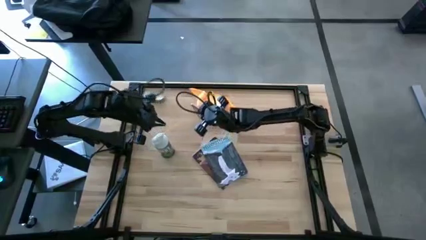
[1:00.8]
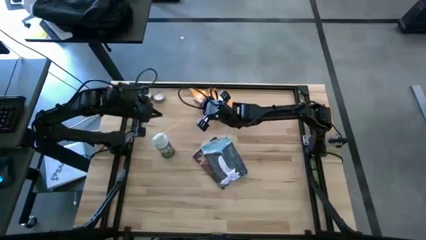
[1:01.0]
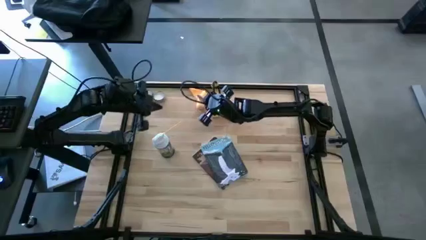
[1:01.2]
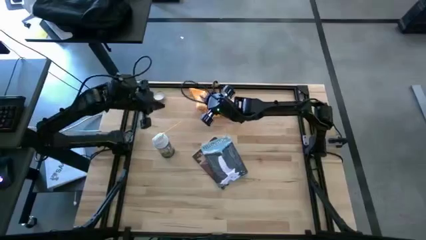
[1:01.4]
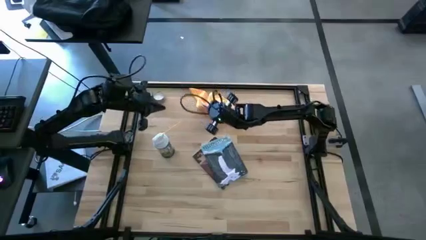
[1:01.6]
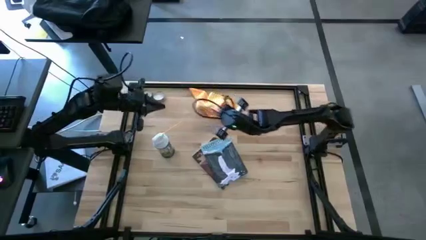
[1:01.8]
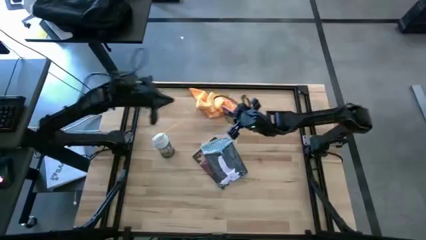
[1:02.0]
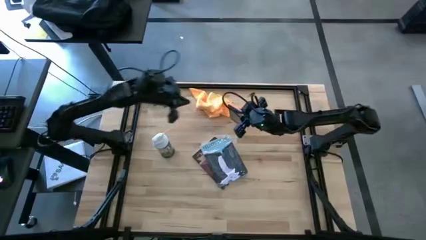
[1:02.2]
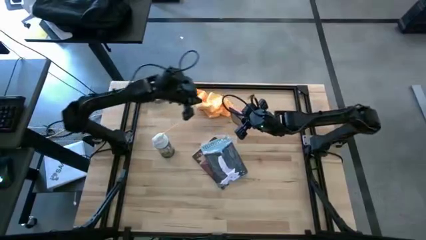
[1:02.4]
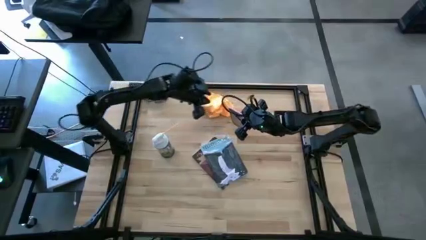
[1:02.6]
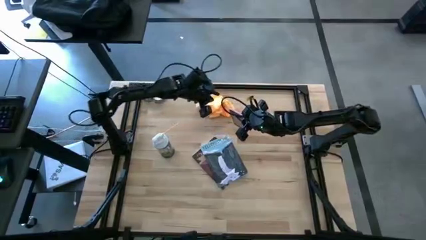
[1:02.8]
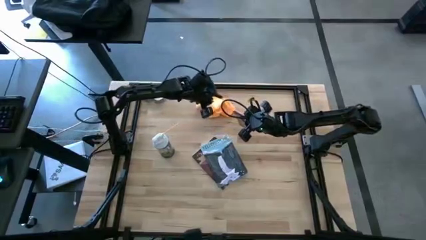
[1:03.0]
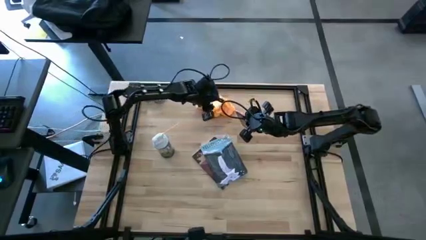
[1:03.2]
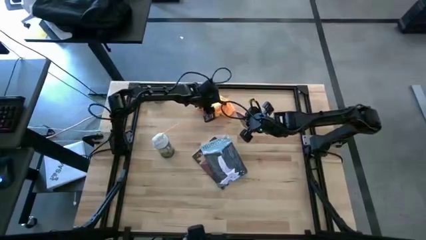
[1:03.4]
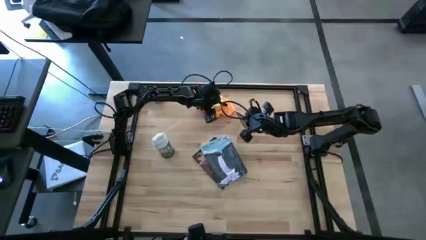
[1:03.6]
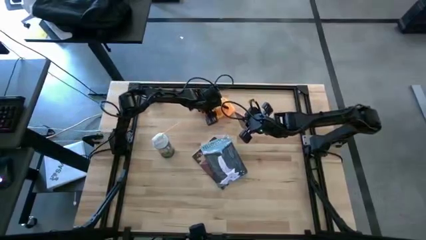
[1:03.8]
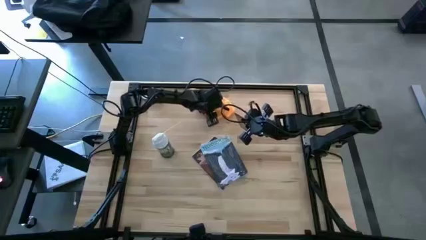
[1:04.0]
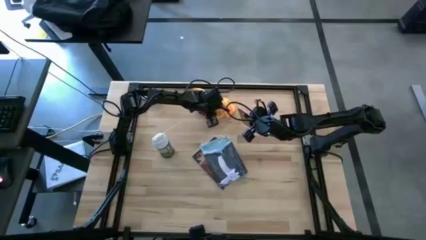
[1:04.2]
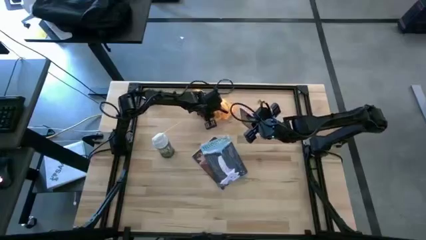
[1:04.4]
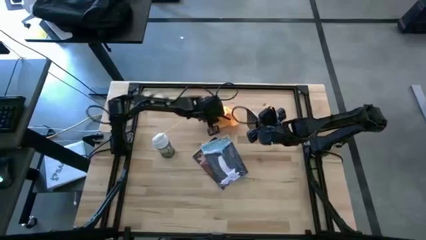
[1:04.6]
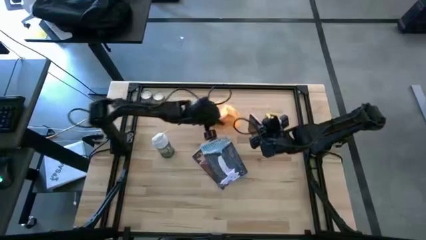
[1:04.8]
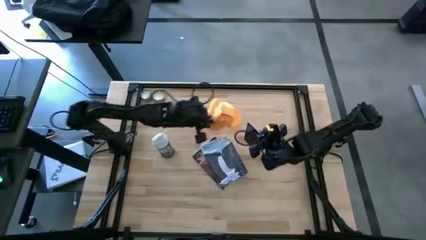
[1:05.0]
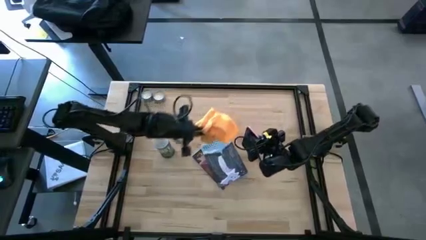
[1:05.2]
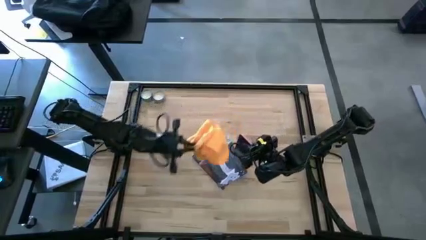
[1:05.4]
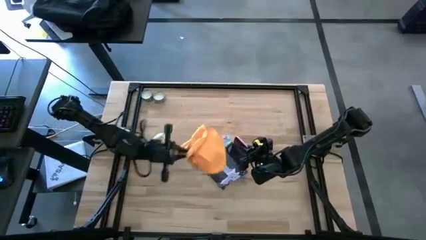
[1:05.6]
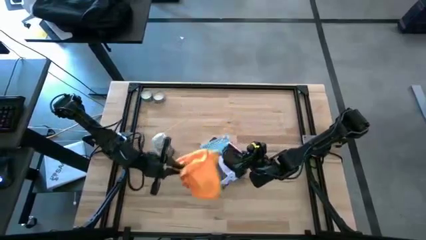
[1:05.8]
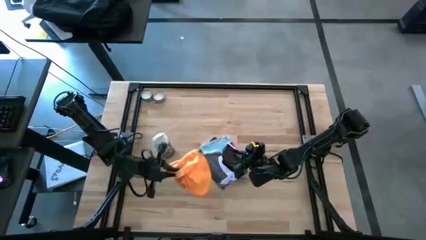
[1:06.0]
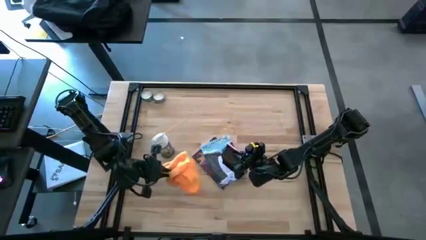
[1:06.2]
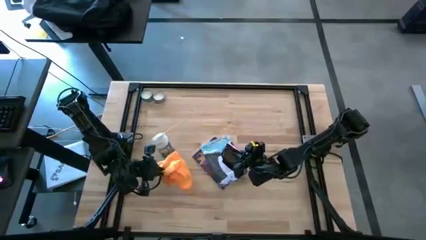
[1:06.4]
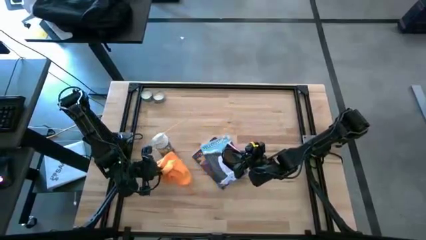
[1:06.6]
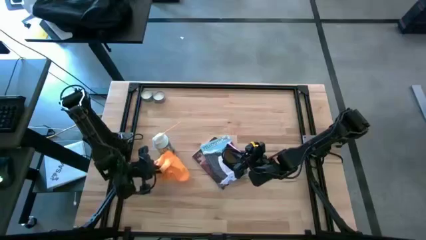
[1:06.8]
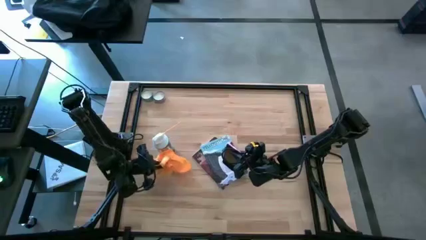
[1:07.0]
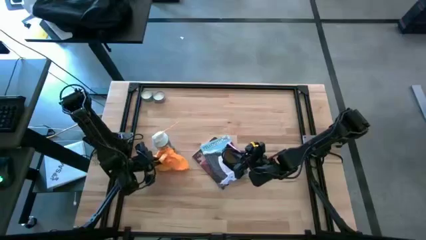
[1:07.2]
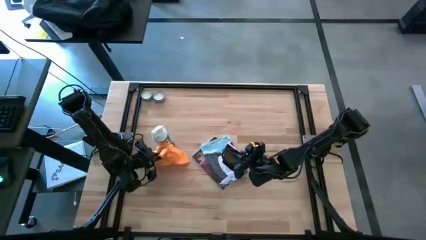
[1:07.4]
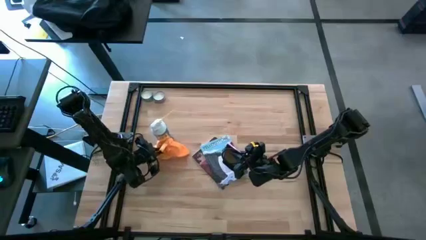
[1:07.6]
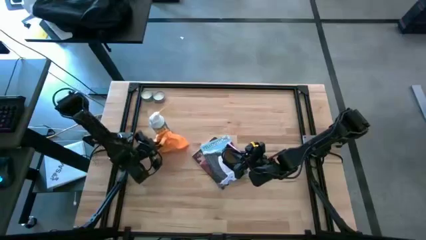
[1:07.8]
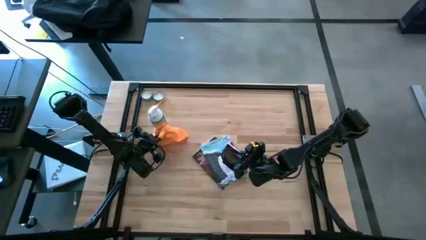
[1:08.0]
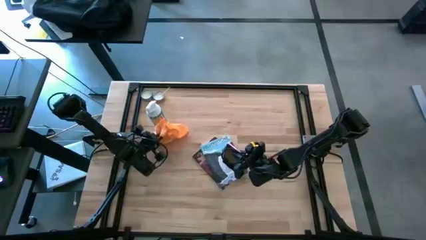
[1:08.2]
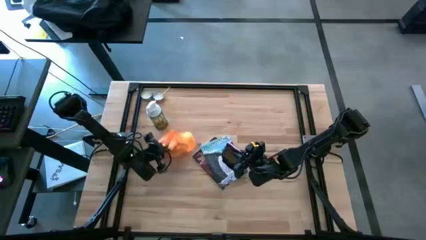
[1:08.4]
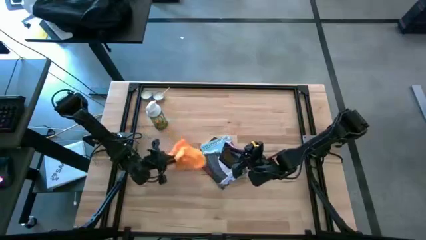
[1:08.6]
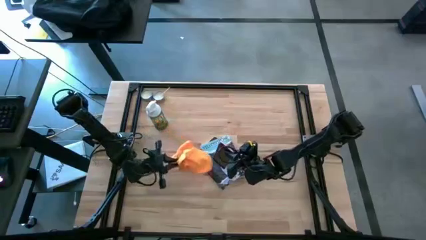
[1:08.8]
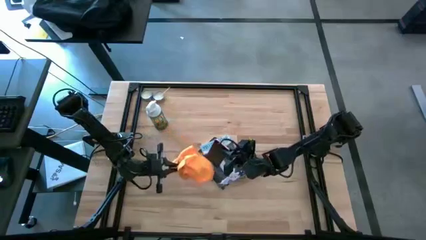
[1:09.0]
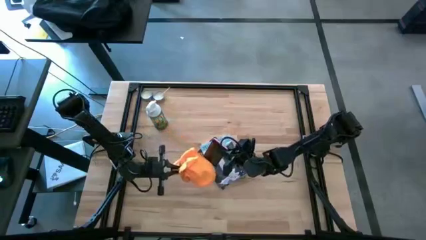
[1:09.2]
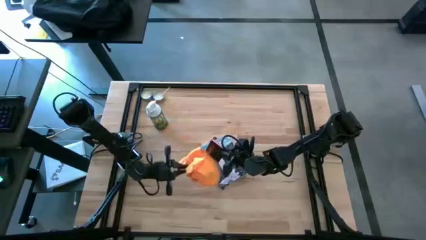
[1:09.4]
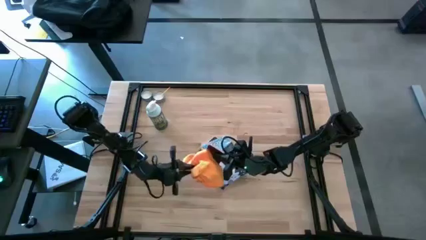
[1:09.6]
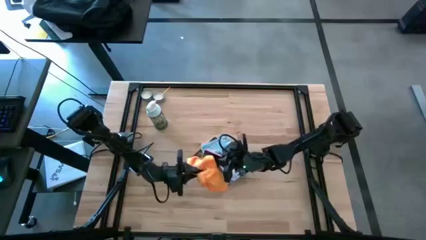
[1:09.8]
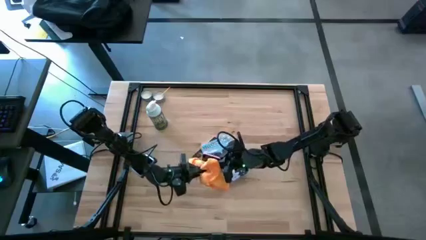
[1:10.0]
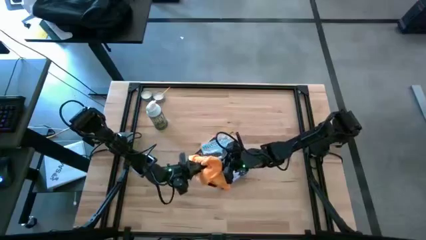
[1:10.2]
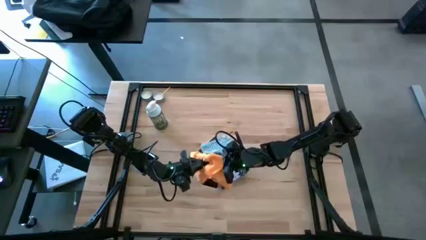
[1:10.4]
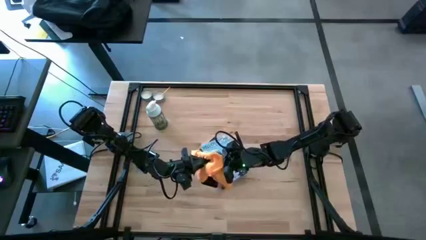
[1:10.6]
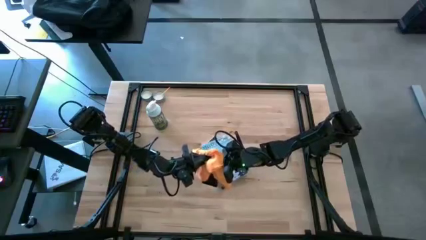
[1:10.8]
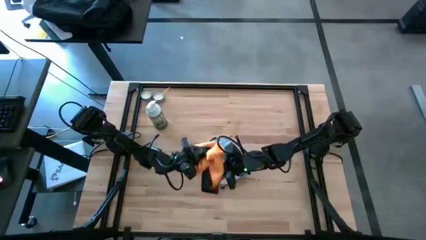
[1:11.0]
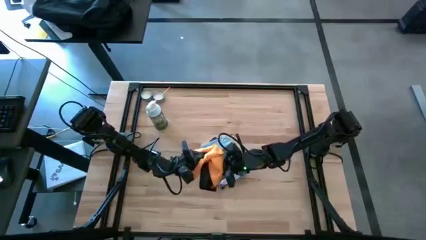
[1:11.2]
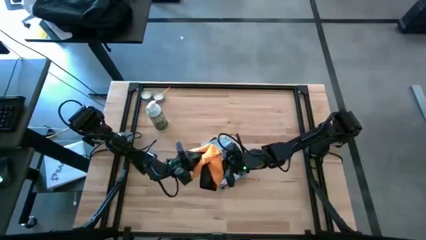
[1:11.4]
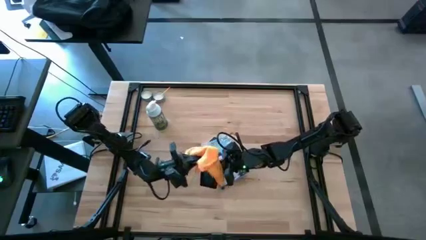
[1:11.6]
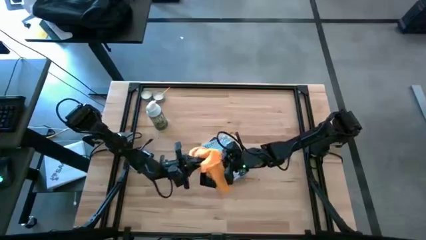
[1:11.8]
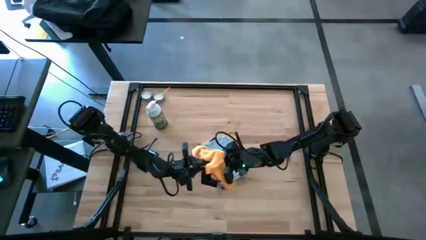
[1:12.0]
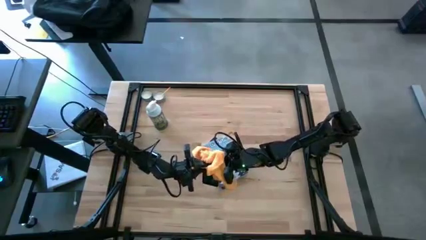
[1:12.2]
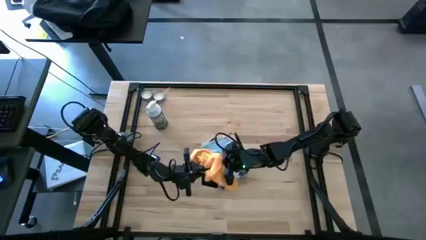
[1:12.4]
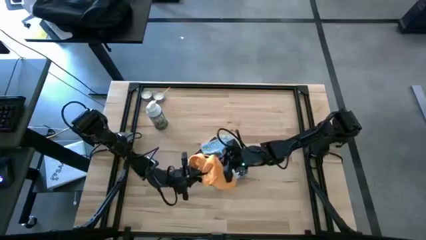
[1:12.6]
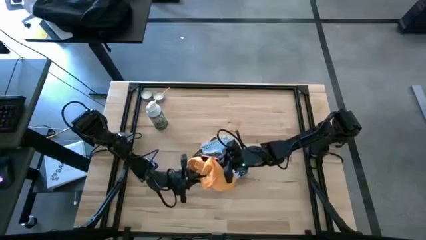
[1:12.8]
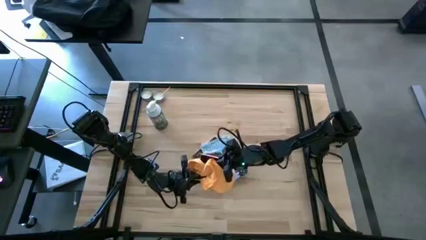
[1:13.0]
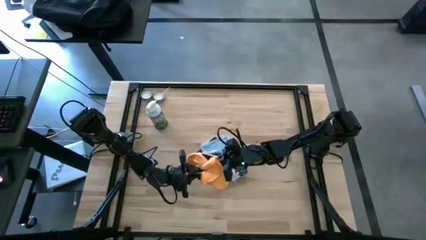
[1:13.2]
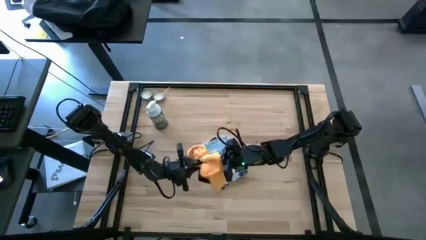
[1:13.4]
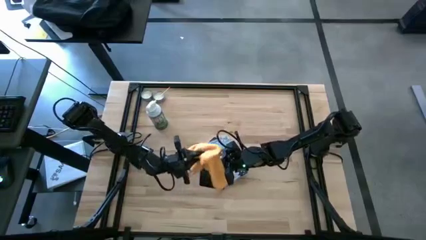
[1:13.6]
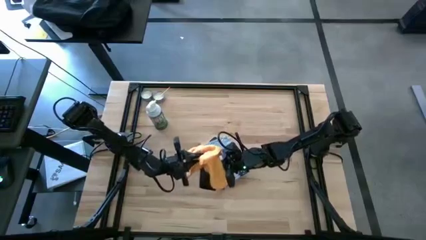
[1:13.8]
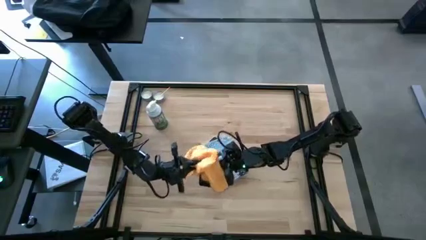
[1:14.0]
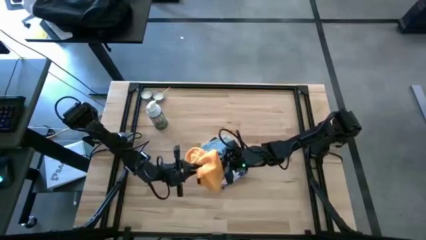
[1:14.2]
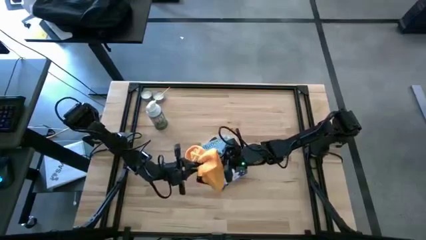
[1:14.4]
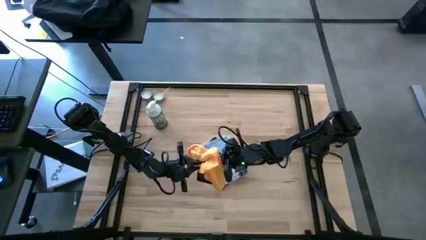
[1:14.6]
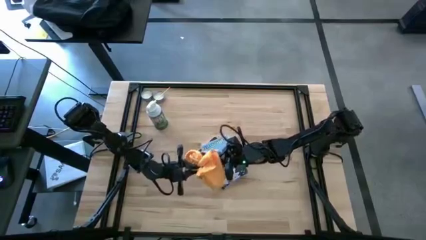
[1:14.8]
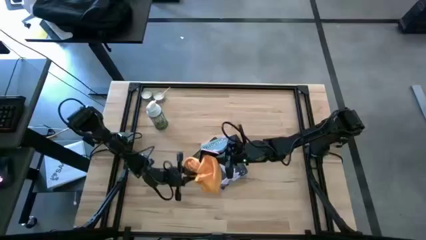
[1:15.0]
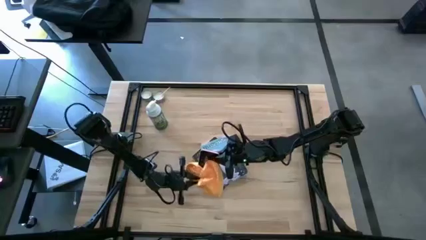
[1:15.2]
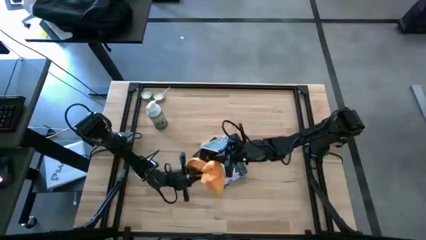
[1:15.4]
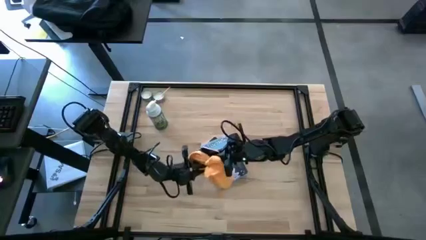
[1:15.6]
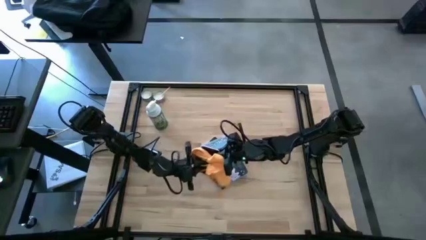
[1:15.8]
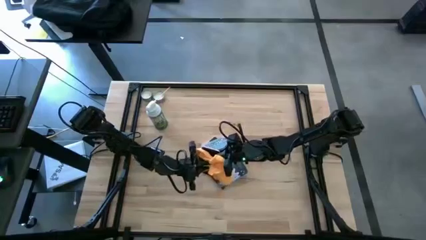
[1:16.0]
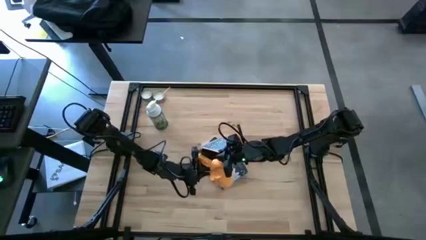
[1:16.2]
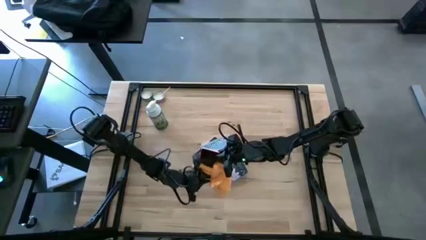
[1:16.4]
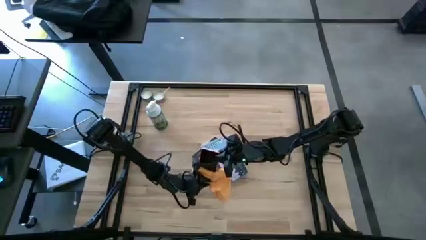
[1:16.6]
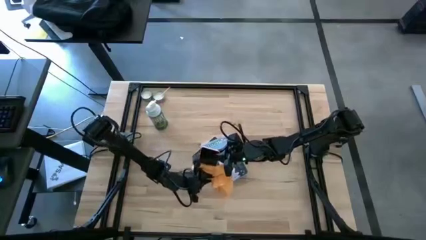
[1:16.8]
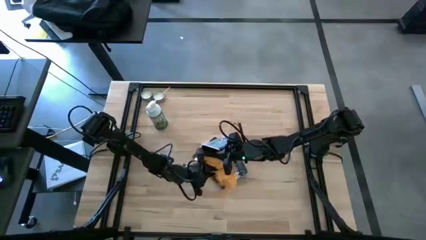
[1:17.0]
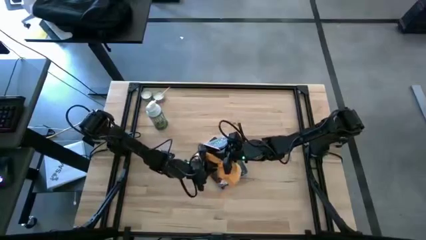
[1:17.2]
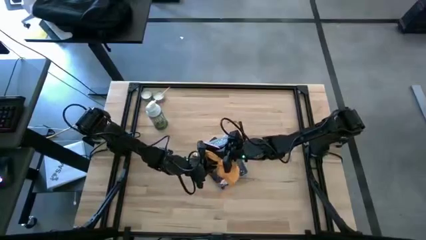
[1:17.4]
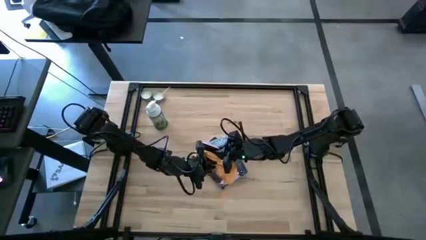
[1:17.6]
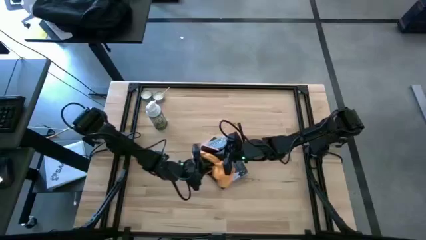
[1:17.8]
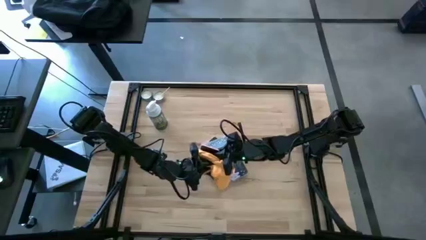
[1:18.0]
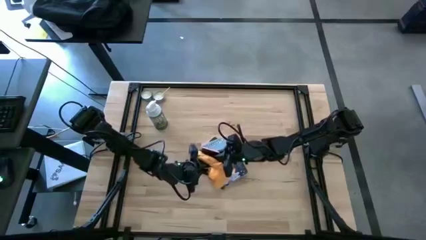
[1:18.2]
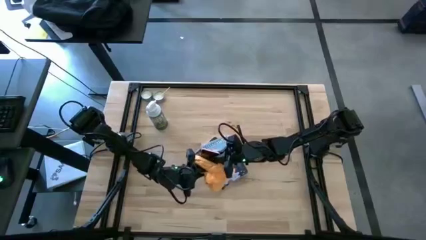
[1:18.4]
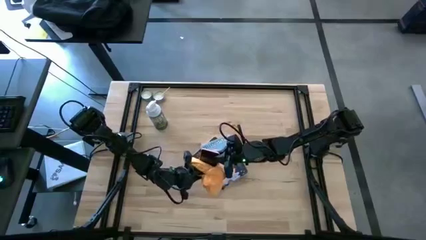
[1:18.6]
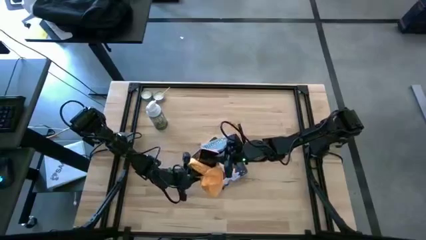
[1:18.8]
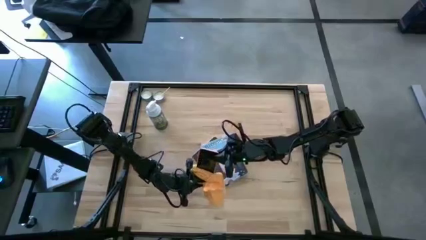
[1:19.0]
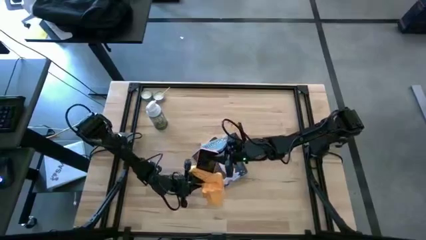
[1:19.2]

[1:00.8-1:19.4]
Task: Apply microfiber cloth
Wipe the front and back of the cellphone using the orange microfiber cloth
